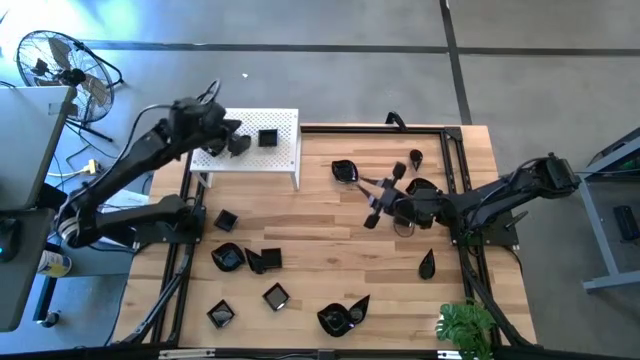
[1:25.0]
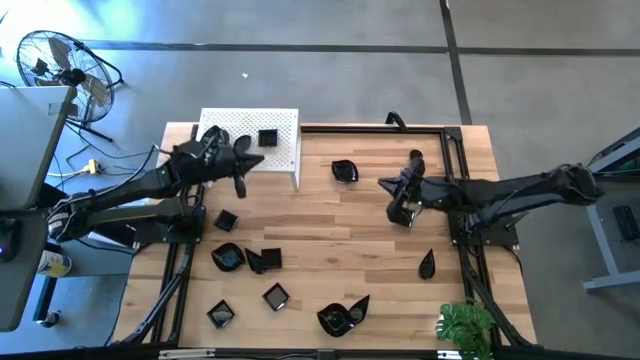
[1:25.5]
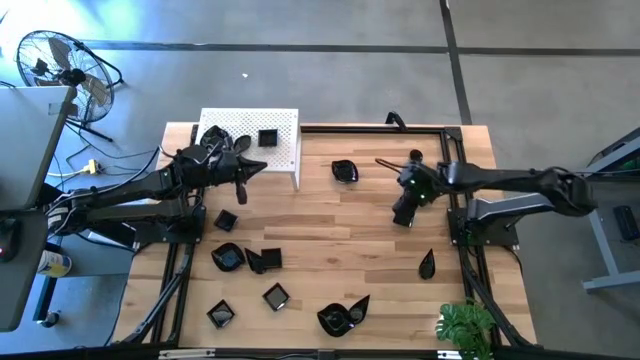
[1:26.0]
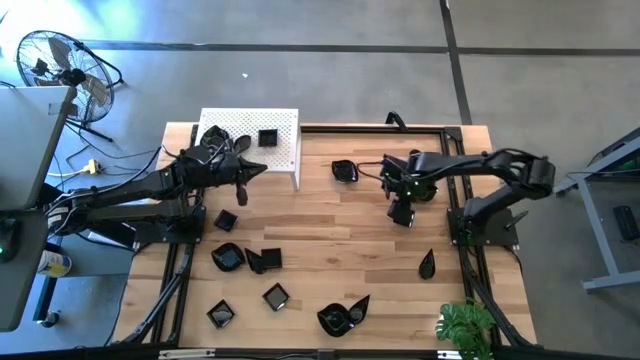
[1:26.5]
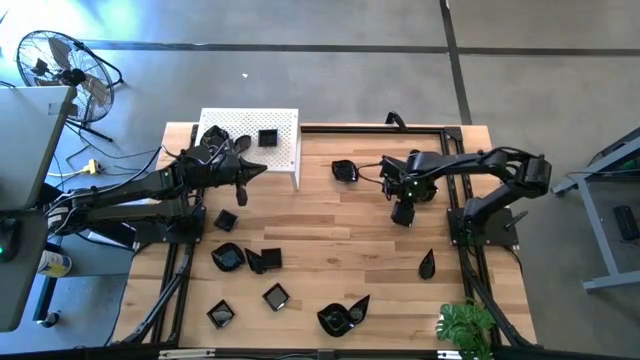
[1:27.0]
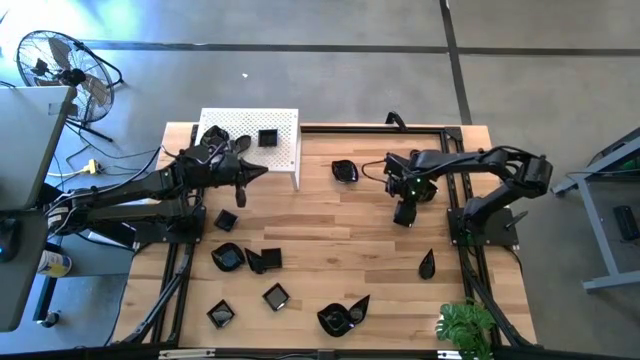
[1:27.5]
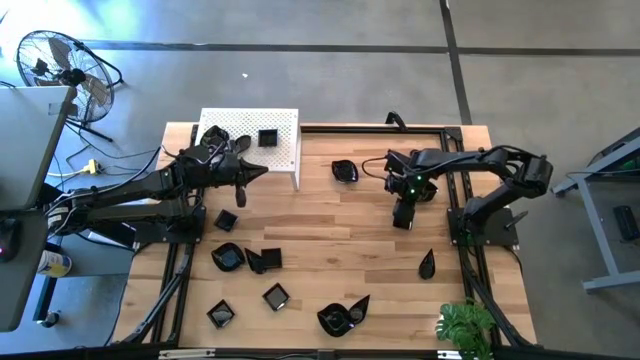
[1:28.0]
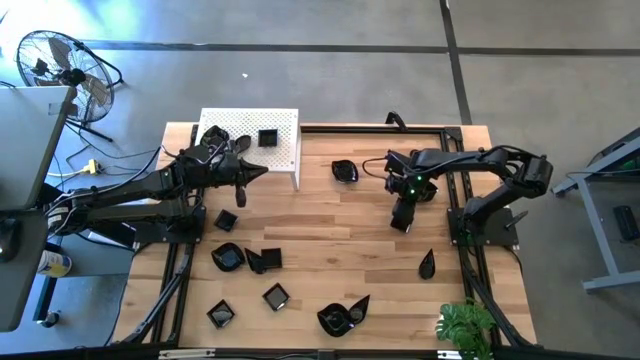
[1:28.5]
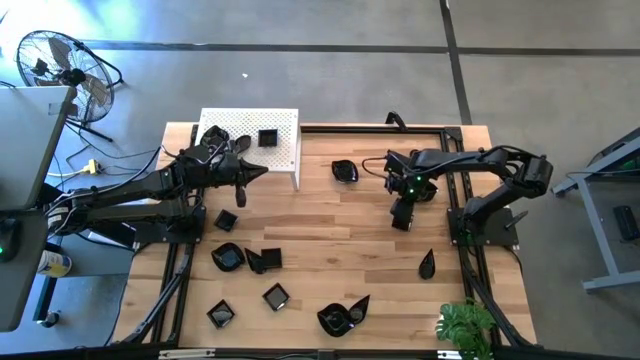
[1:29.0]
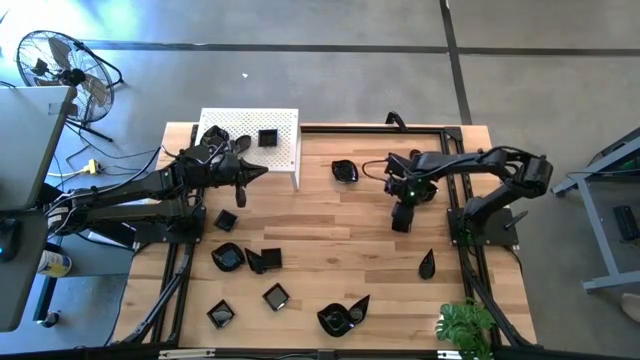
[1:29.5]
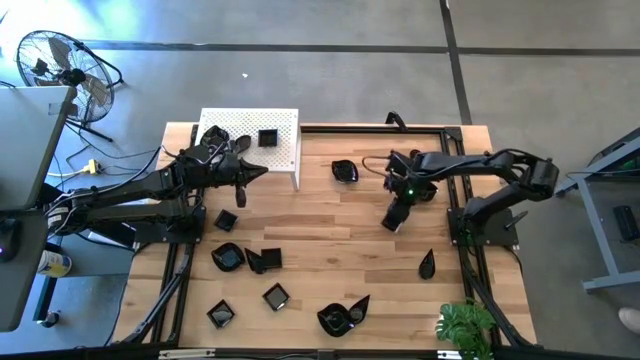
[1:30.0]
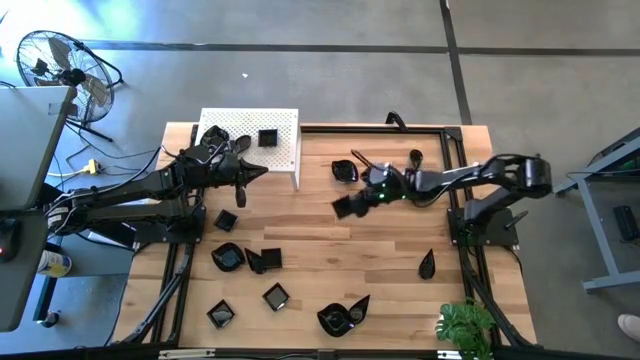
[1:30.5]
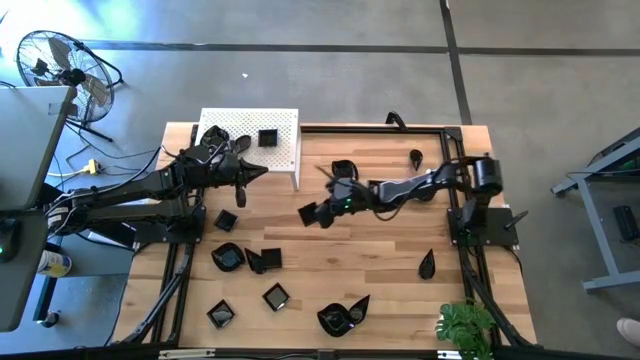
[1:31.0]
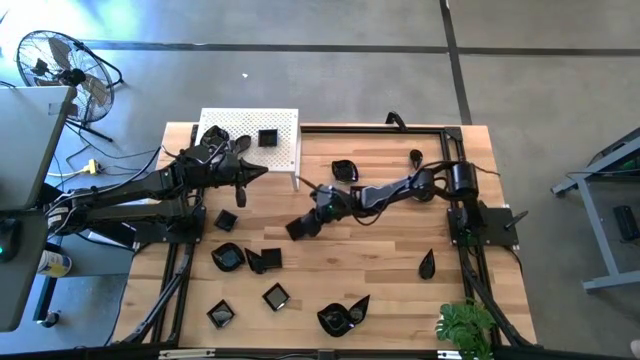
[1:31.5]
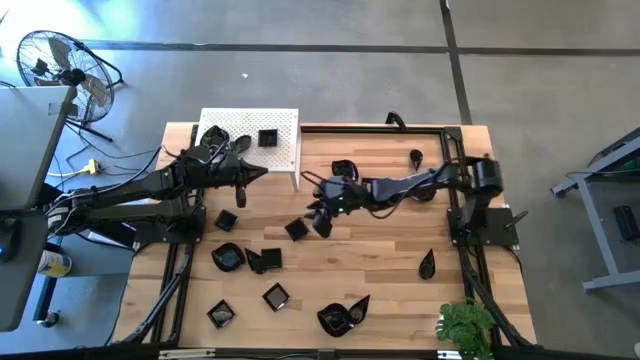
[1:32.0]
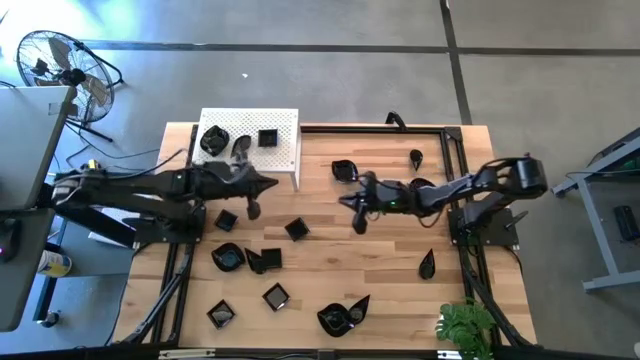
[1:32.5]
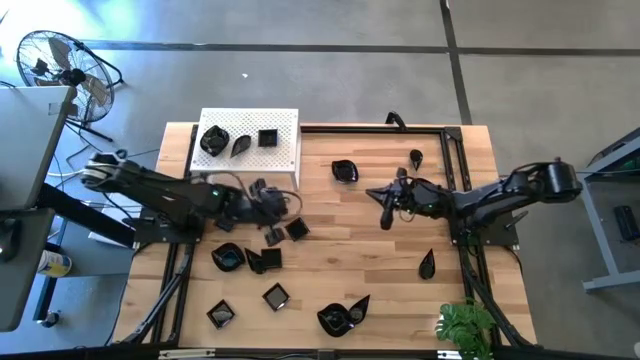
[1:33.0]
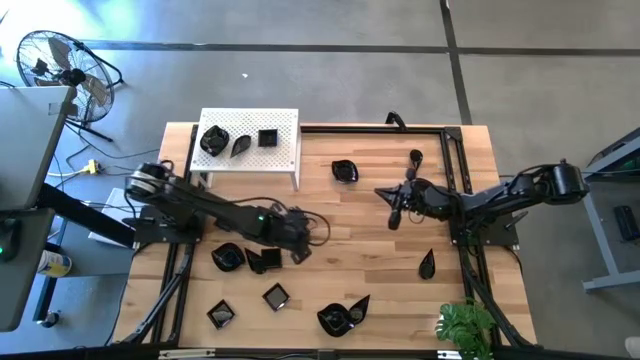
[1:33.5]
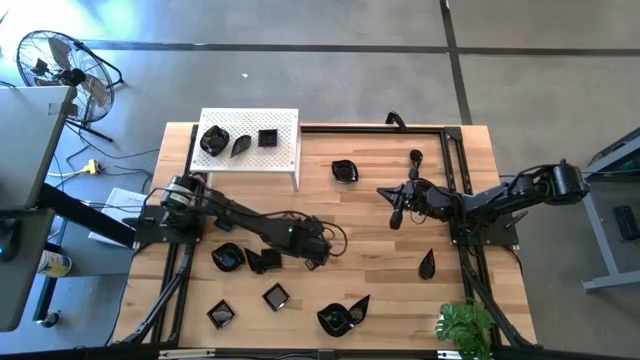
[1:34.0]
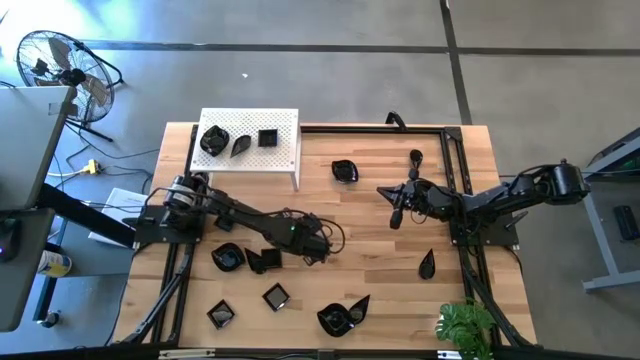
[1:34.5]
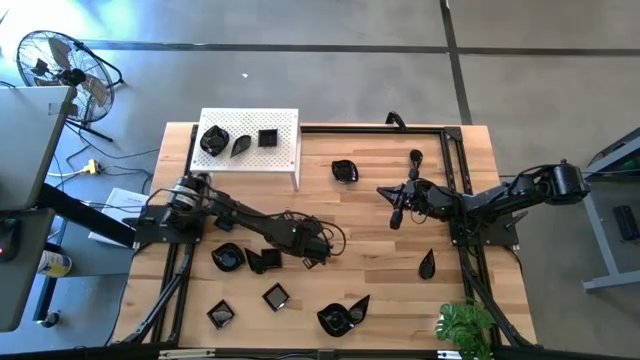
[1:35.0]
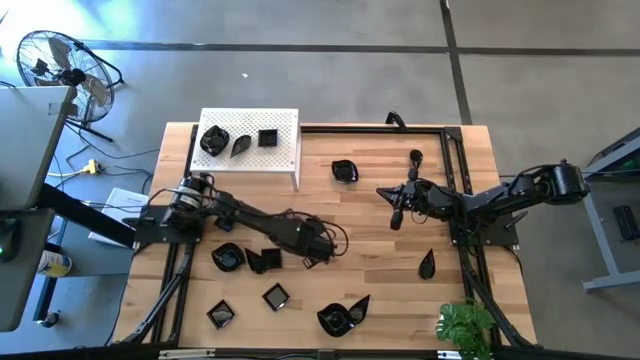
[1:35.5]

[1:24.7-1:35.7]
Task: Pick & Place Mini shaped plates
Stack the black square plate on the top of the black square plate on the shelf

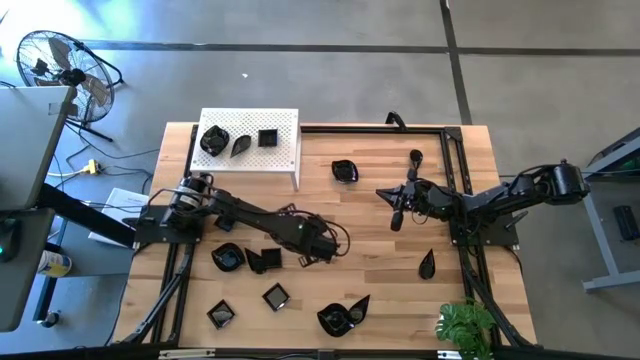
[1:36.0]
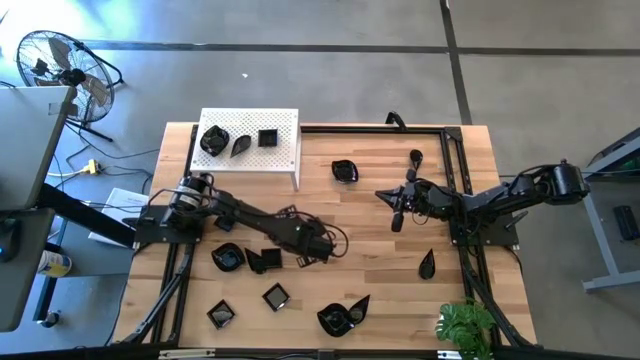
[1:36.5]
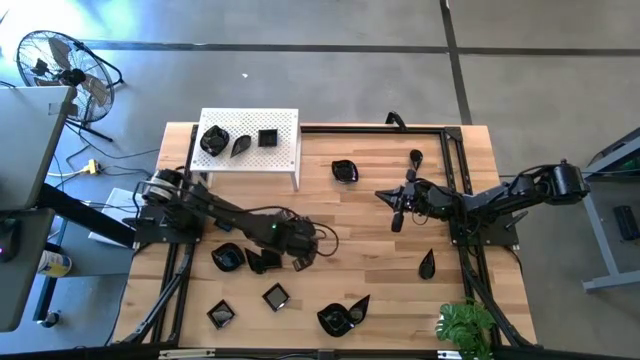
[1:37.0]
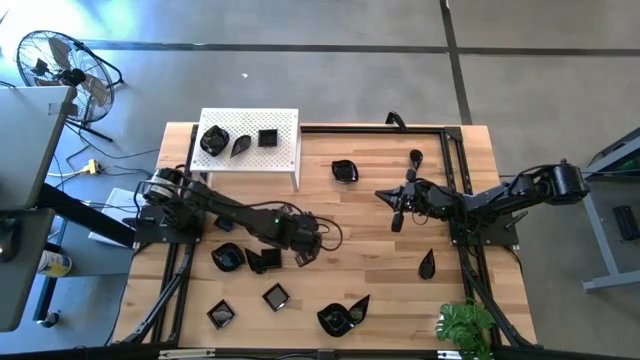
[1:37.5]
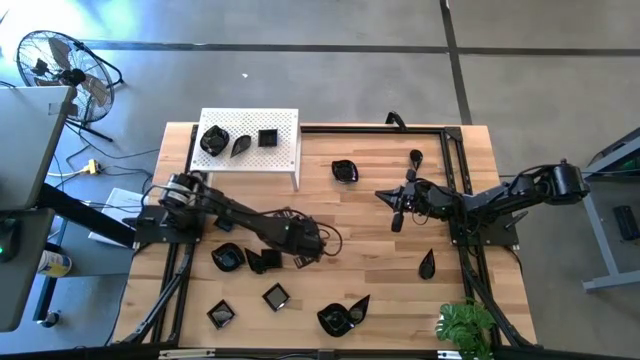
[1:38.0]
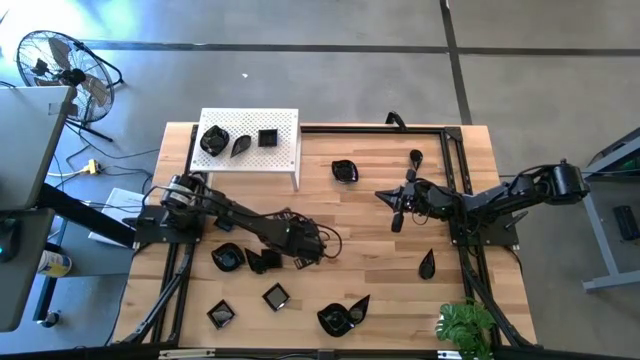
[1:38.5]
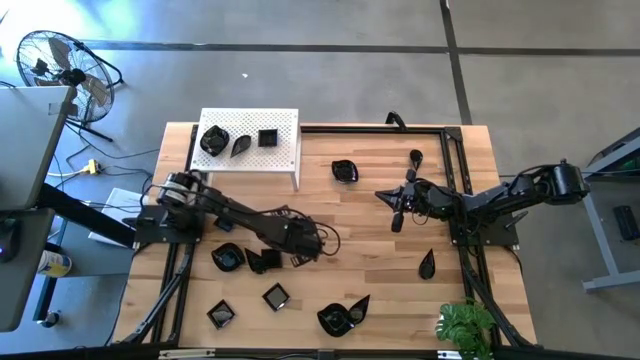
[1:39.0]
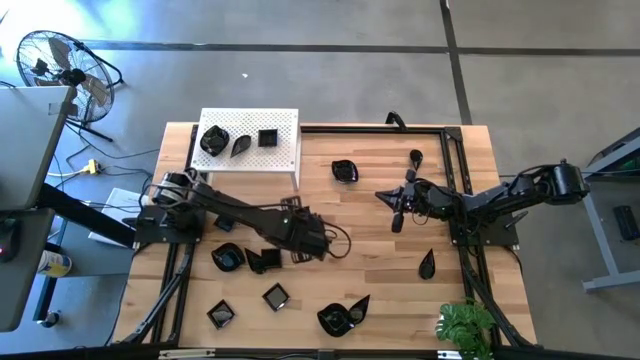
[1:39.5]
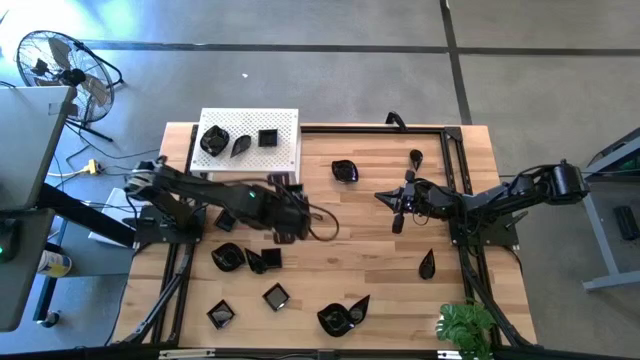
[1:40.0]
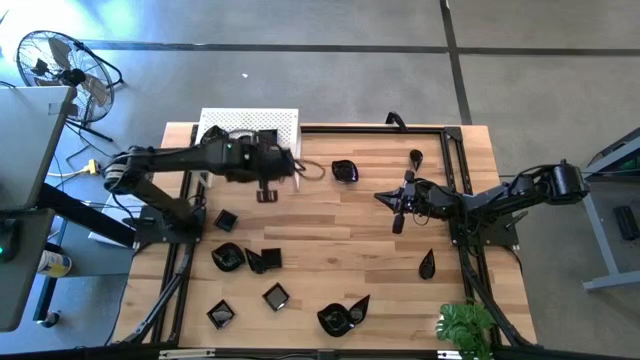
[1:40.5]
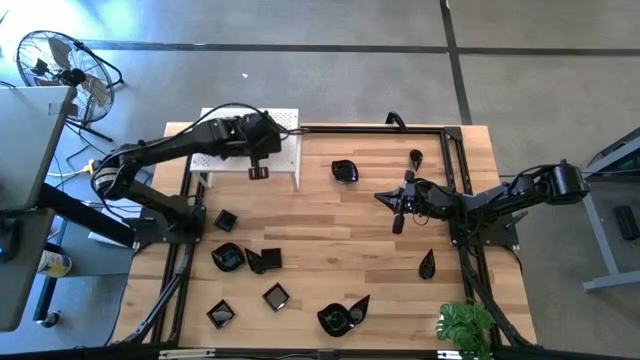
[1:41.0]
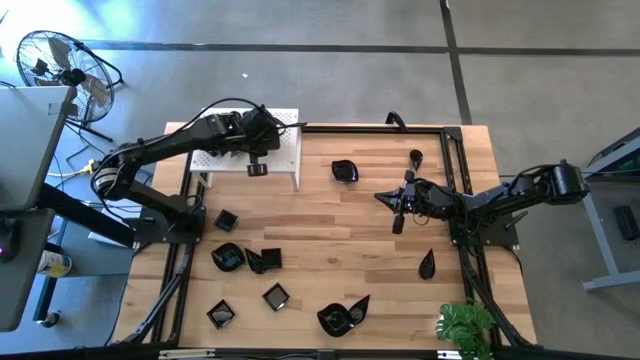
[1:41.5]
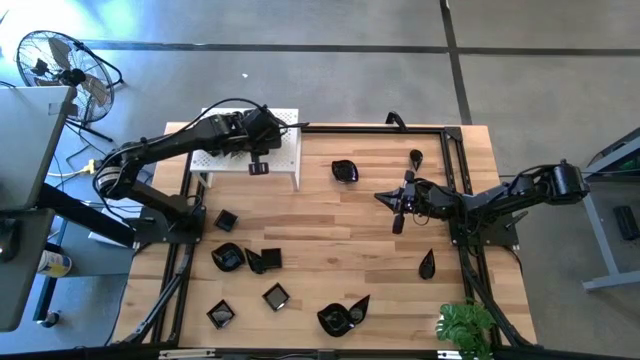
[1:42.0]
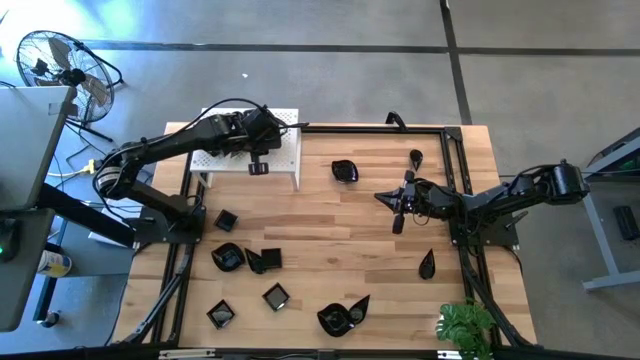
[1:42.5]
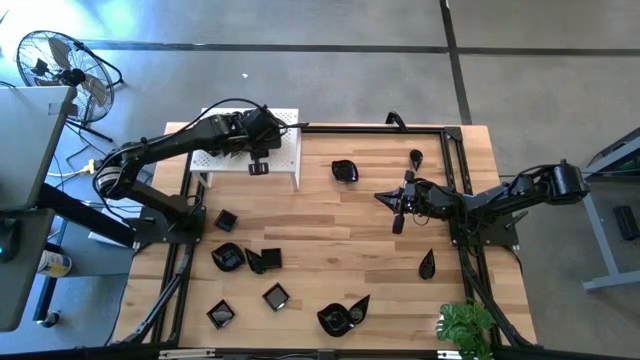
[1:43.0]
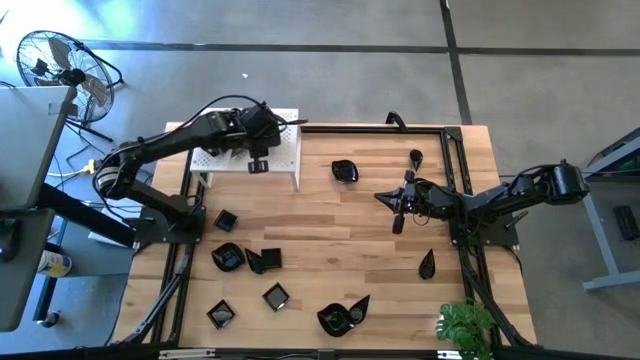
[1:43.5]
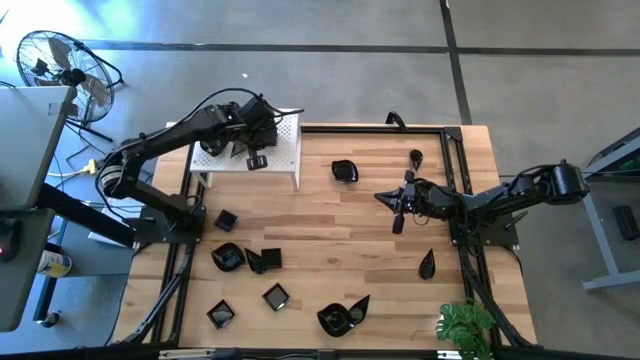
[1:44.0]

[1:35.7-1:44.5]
Stack the black square plate on the top of the black square plate on the shelf

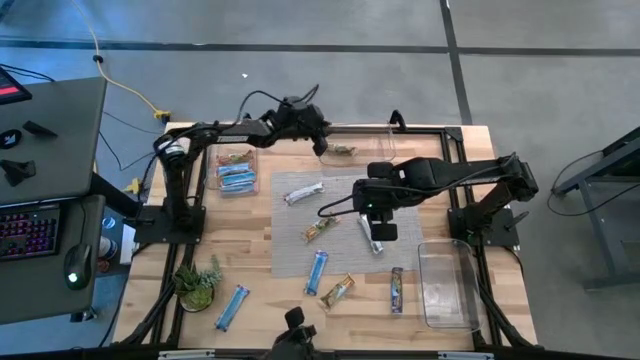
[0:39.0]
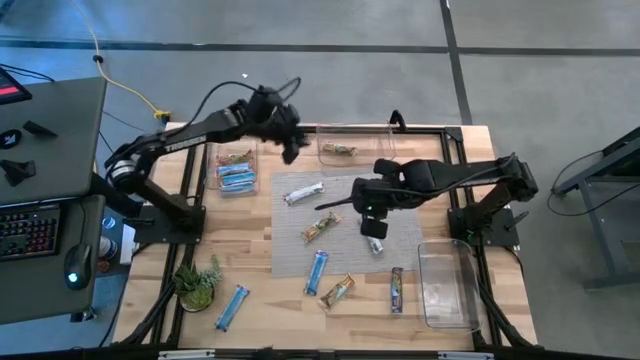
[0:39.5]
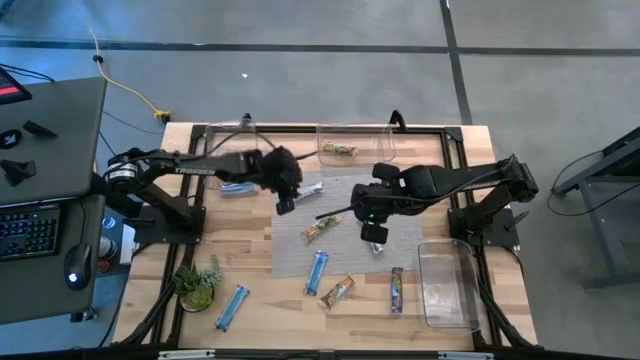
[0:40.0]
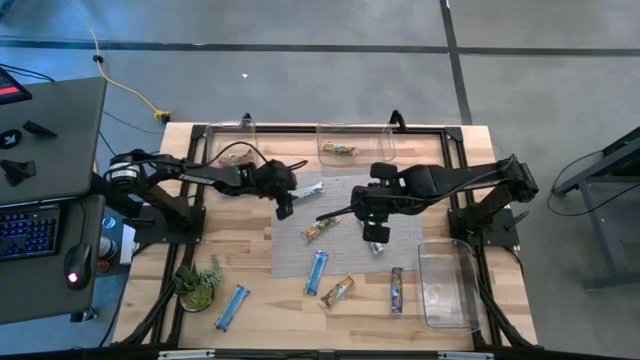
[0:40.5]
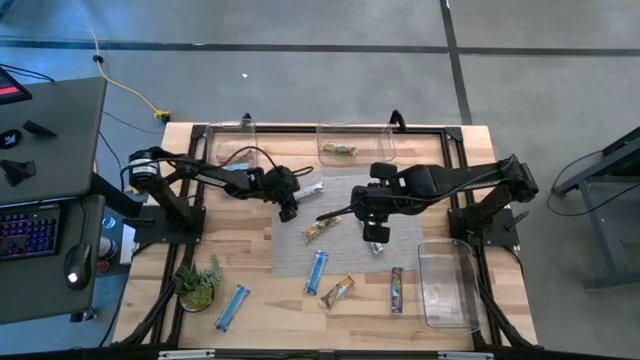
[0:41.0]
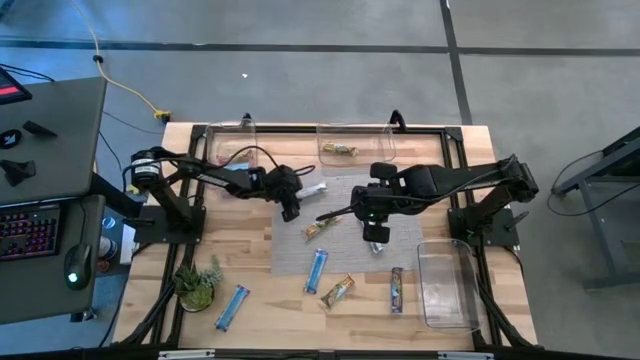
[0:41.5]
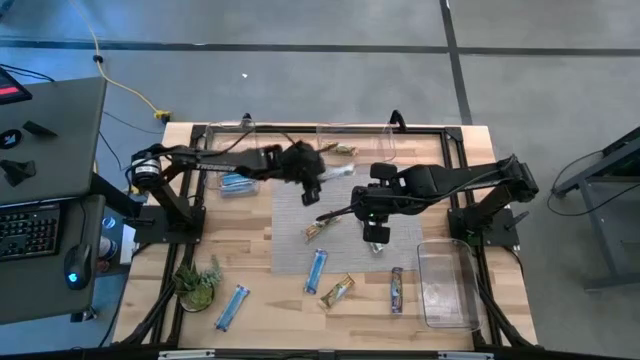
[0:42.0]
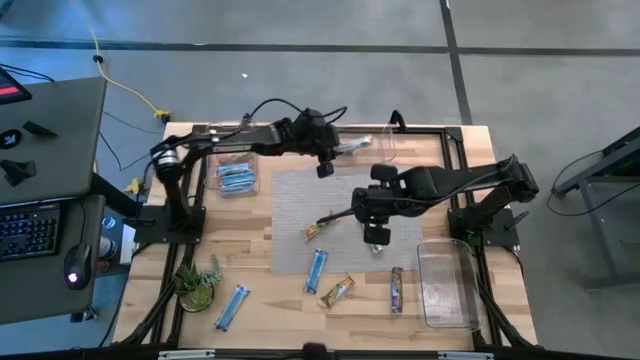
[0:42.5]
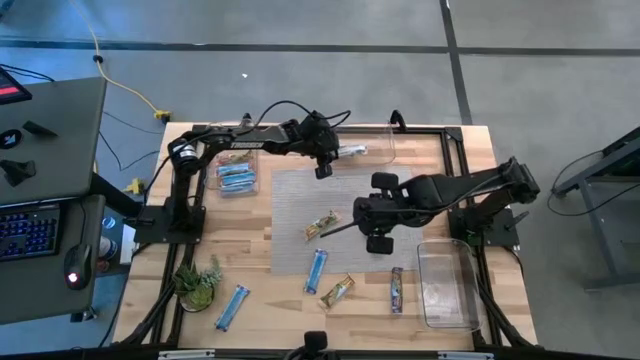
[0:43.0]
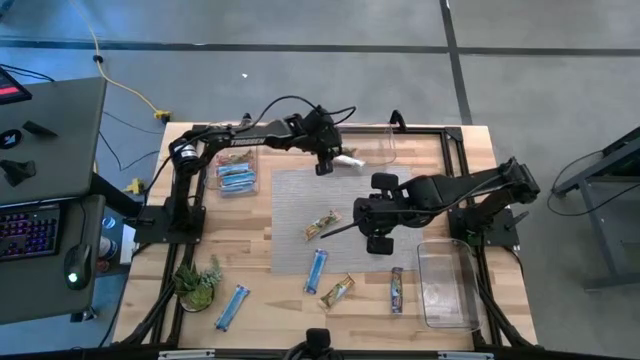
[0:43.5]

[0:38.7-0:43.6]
Task: Pick and place Granola Bars by type
Put the yellow granola bar into the top right transparent bin
